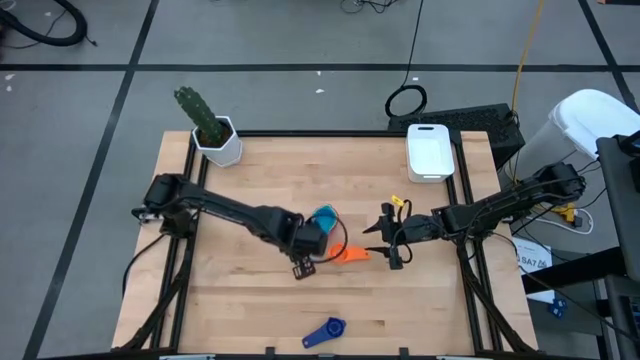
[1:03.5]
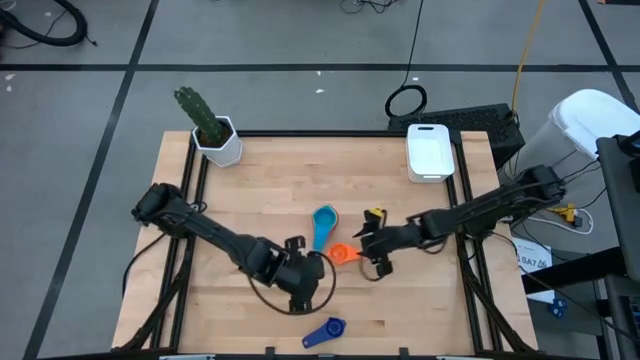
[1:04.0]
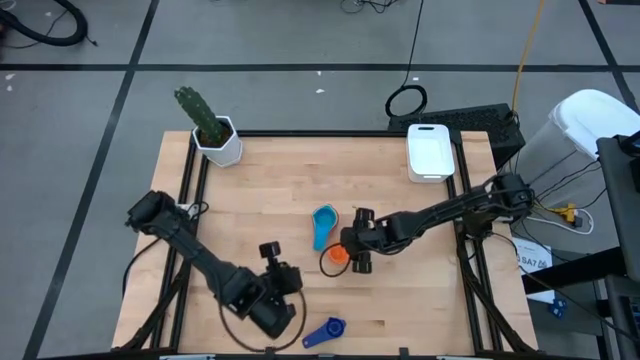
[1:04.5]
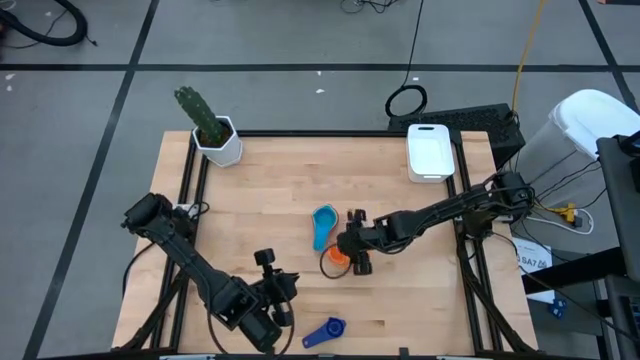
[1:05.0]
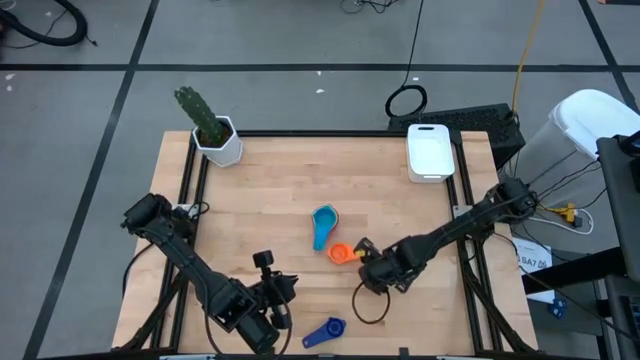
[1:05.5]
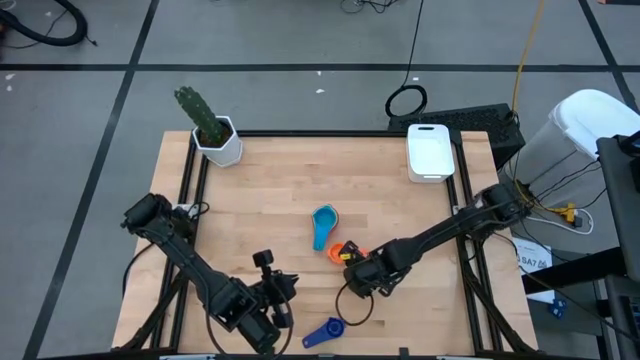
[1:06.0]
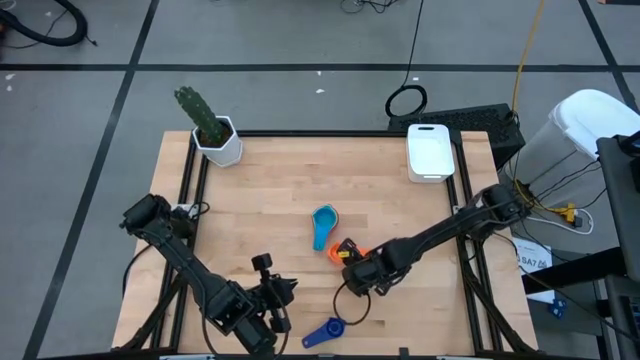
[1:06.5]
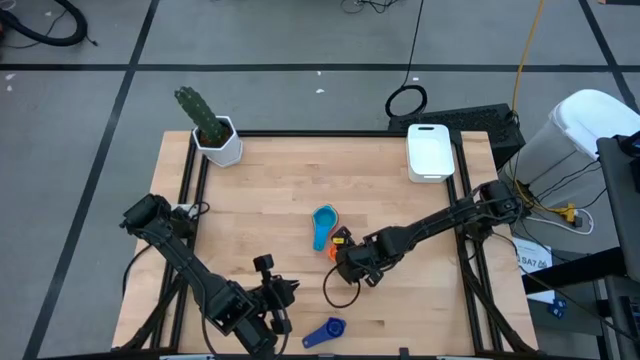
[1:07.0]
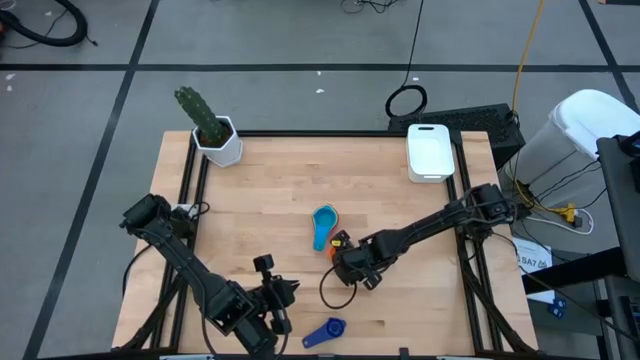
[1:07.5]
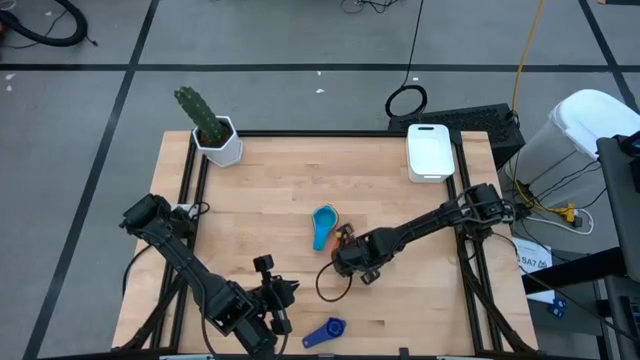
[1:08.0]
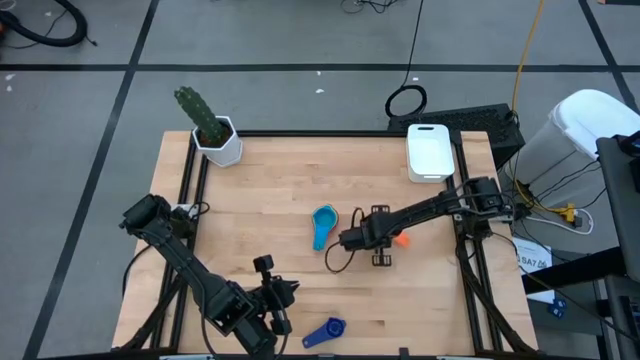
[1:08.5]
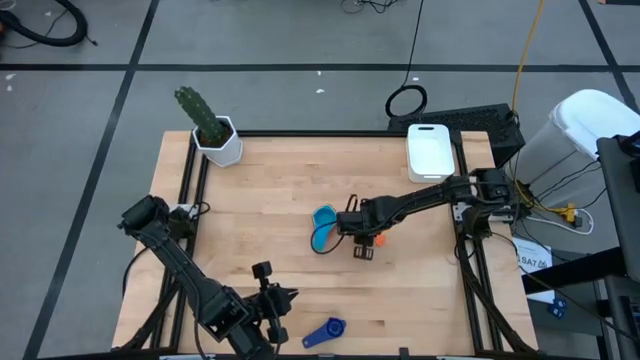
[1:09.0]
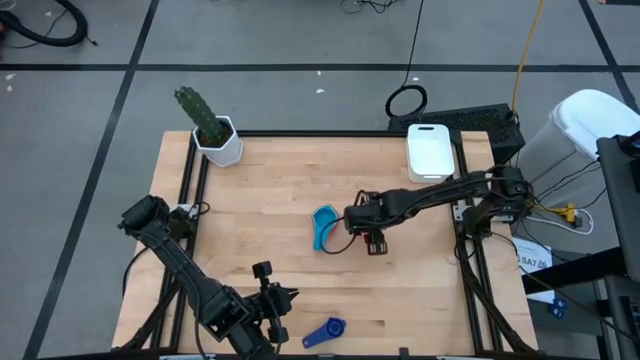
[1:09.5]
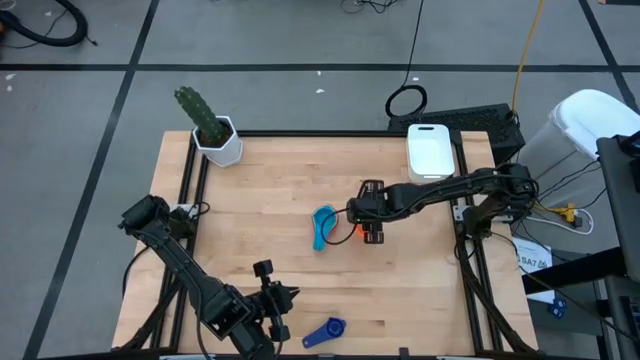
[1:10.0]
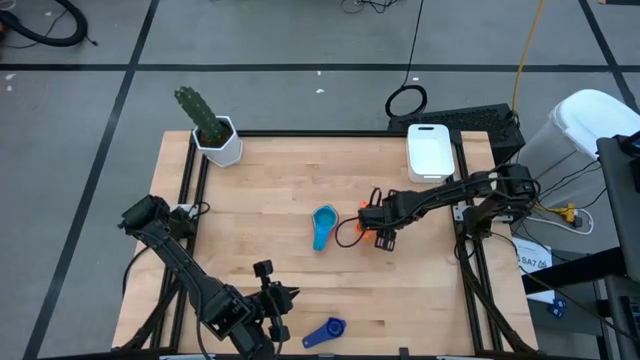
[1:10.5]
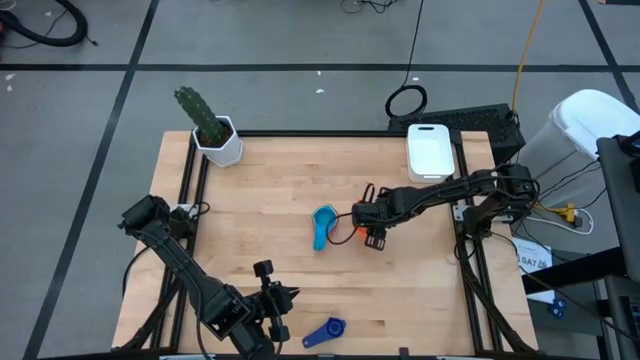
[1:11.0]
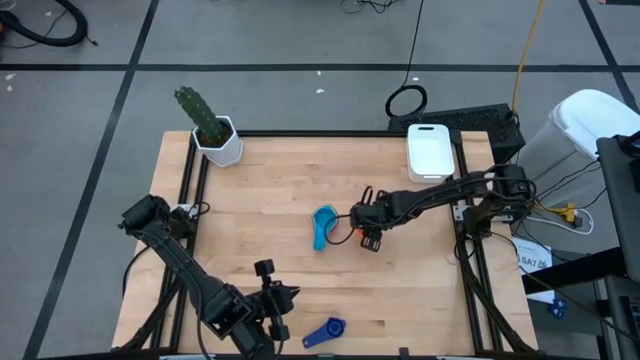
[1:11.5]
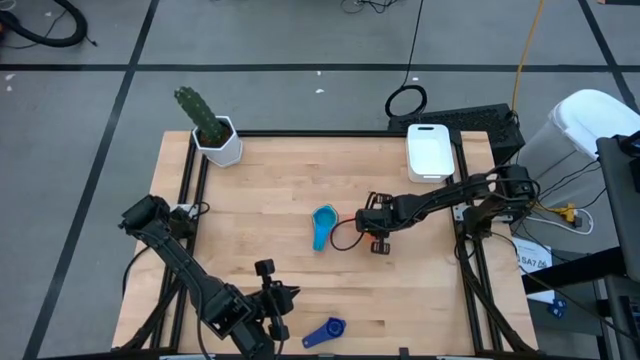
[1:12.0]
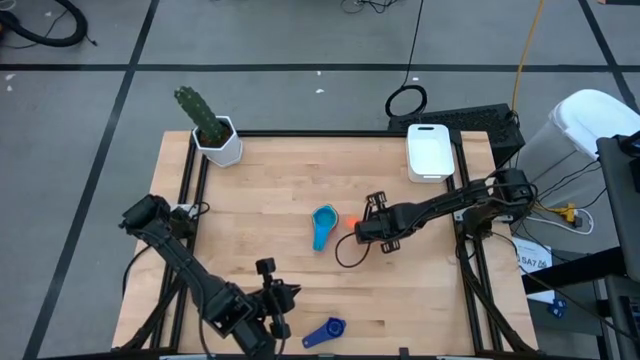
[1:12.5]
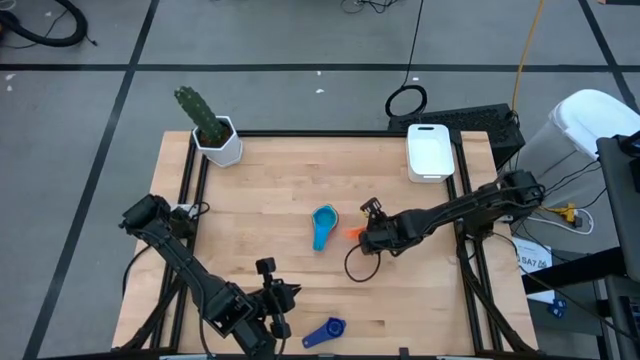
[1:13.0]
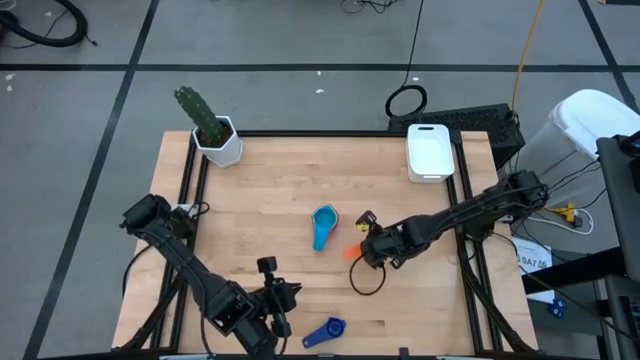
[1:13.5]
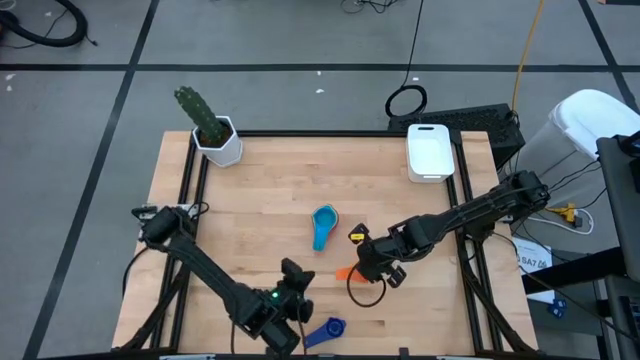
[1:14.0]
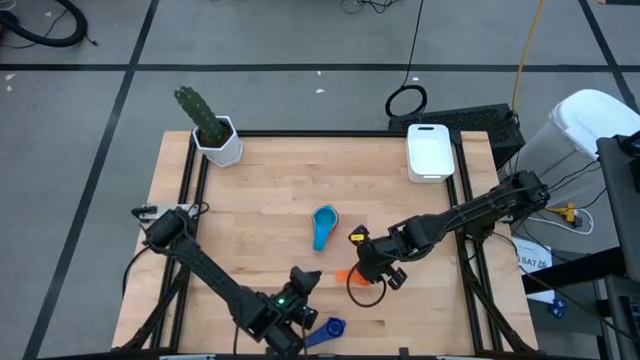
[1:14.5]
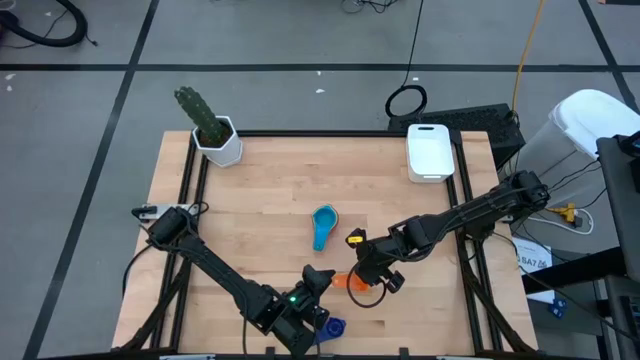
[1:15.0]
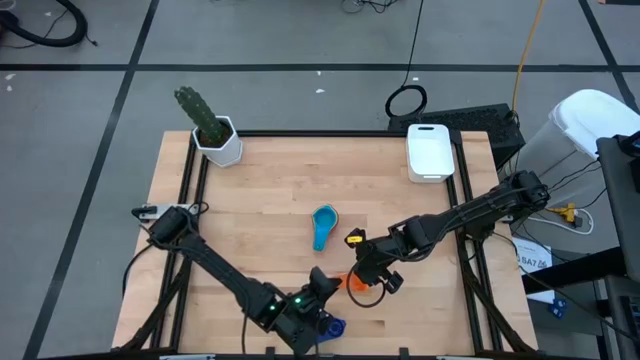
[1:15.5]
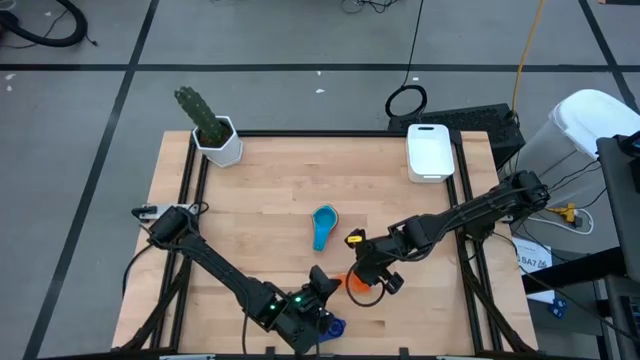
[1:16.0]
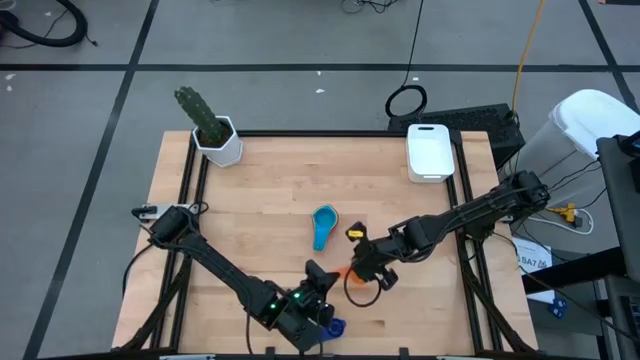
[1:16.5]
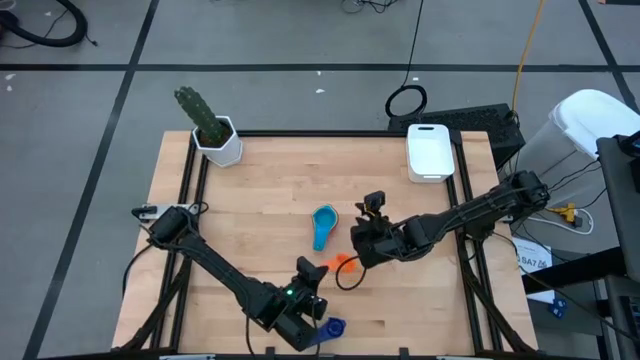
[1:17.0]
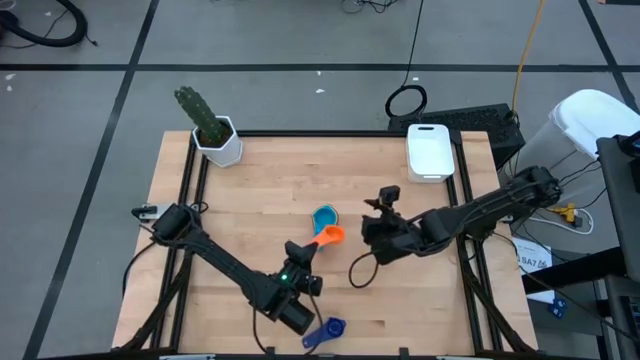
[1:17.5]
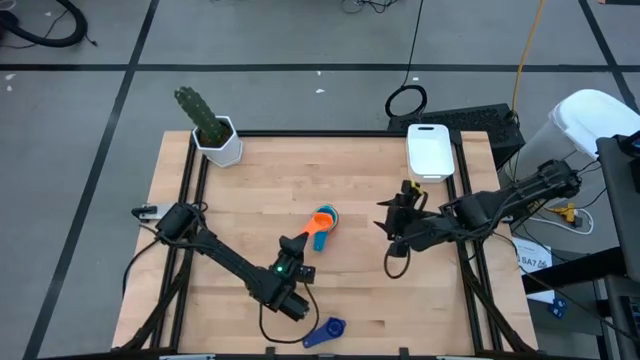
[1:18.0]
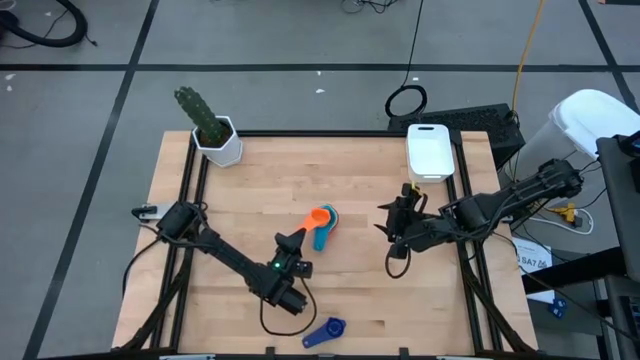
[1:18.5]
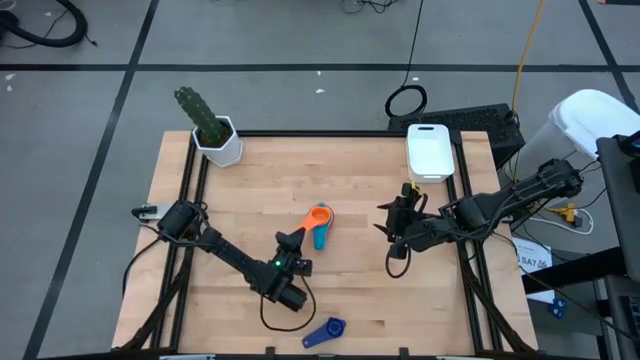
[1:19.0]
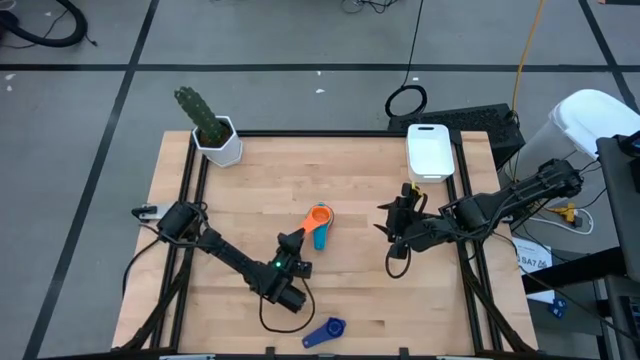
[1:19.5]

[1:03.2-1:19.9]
Task: Nest measuring cups in basket
Stack the orange measuring on top of the sky blue measuring cup

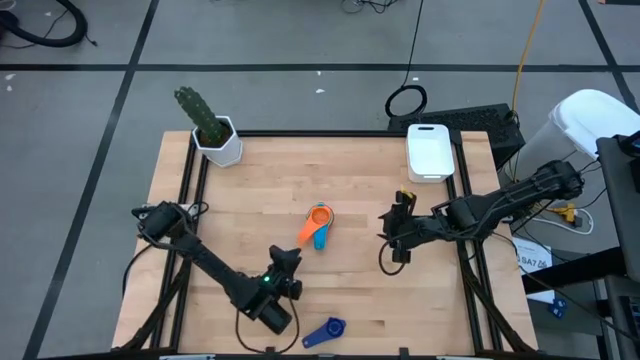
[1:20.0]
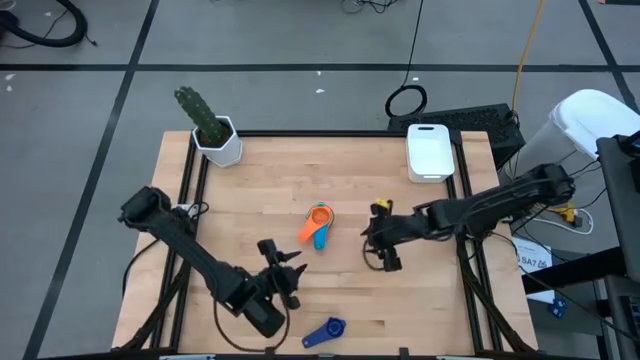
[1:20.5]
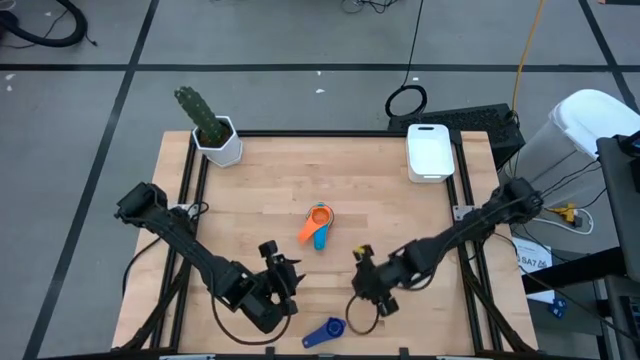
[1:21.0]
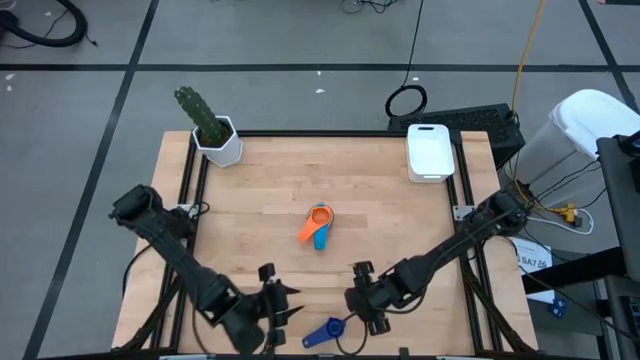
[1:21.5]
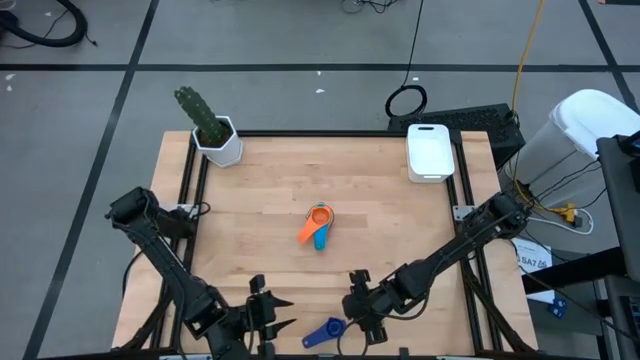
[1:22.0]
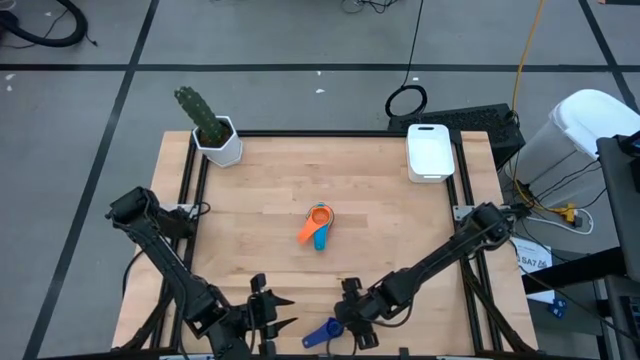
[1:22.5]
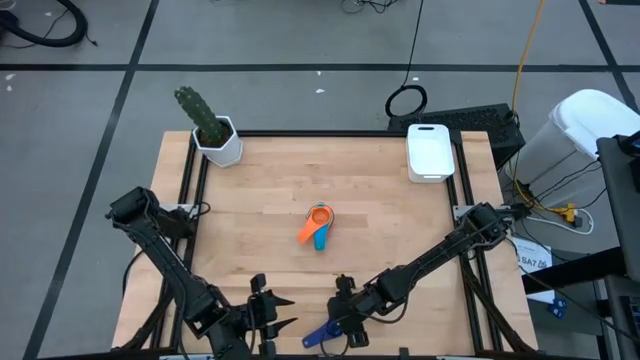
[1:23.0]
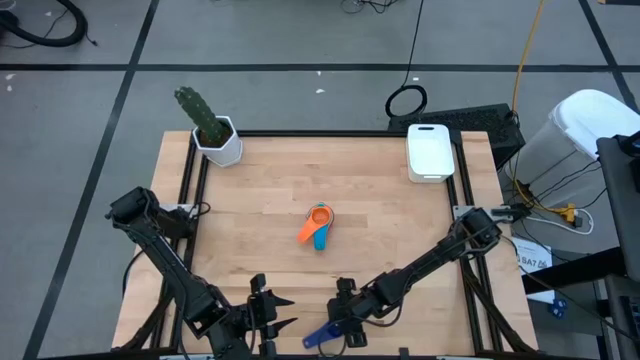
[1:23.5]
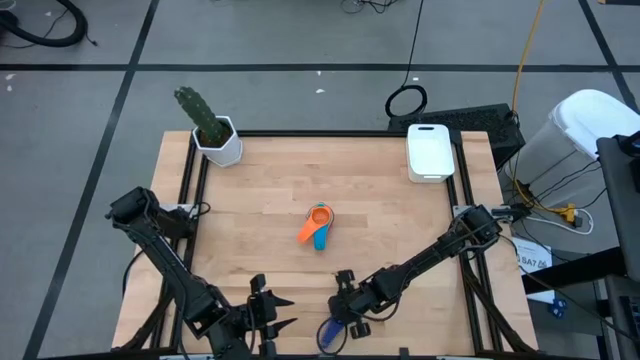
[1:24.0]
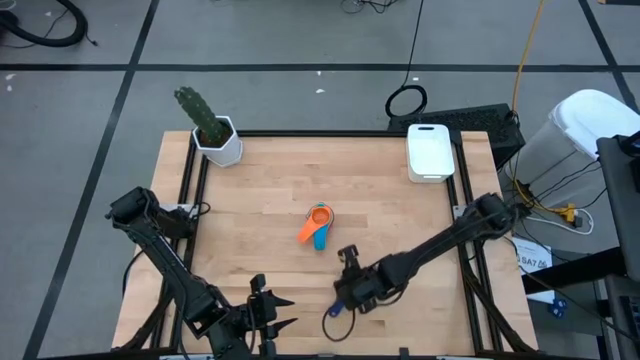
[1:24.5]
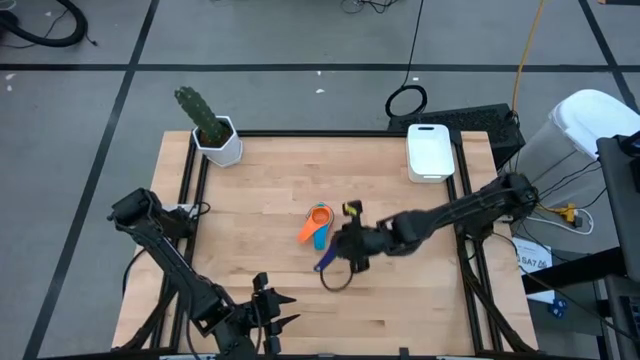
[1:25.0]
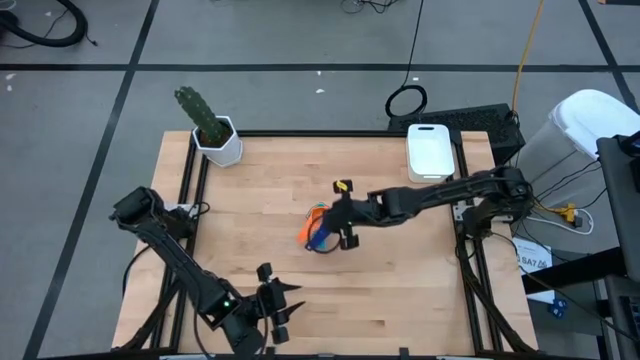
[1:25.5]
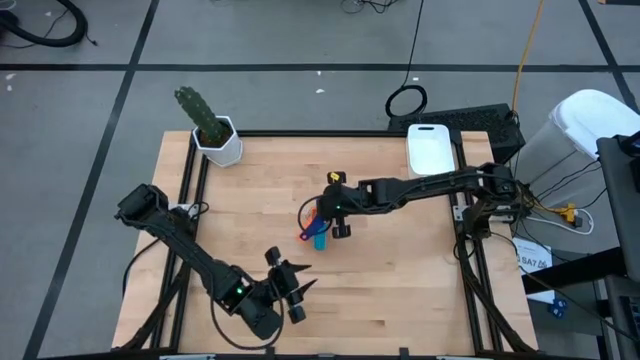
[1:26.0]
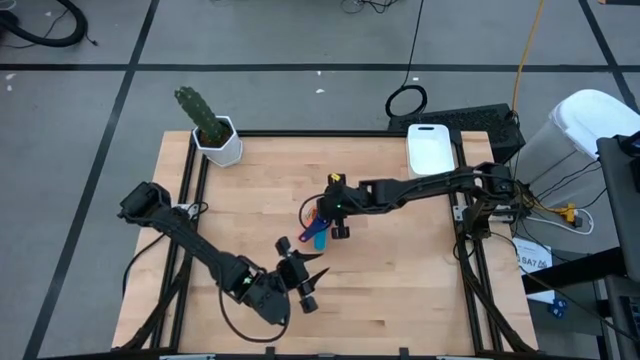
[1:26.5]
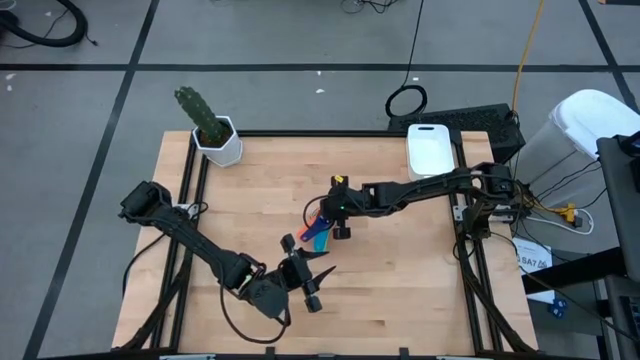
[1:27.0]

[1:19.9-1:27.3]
Stack the dark blue measuring cup on top of the orange measuring cup
